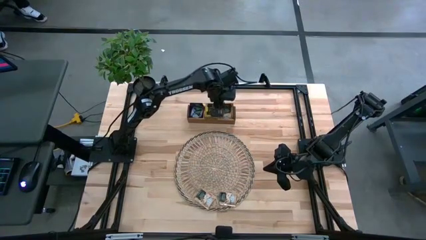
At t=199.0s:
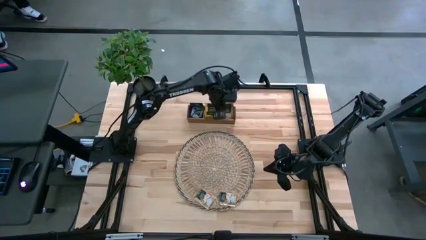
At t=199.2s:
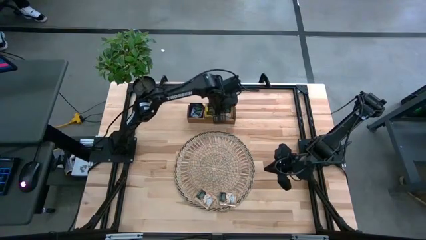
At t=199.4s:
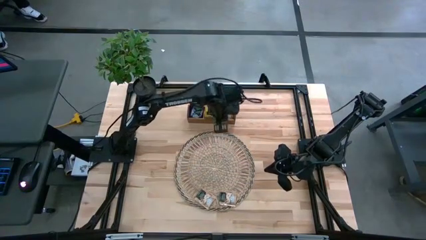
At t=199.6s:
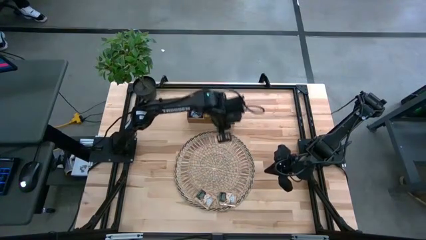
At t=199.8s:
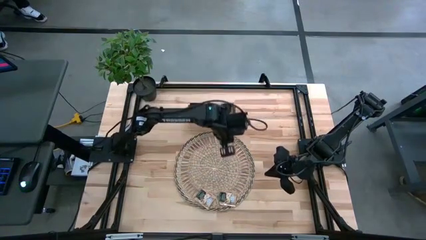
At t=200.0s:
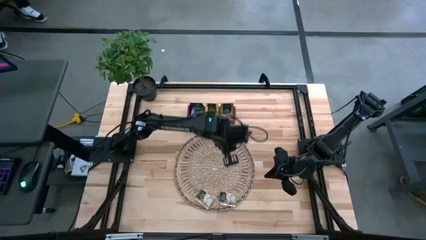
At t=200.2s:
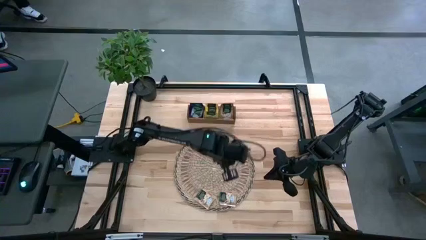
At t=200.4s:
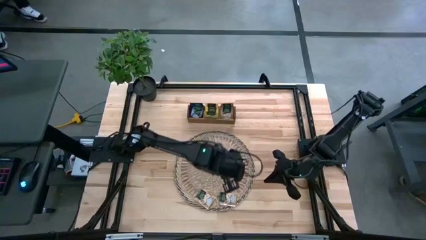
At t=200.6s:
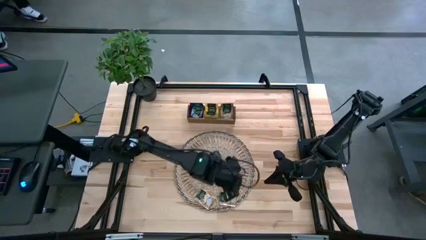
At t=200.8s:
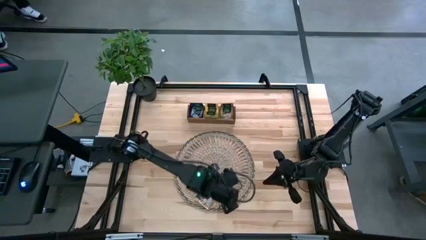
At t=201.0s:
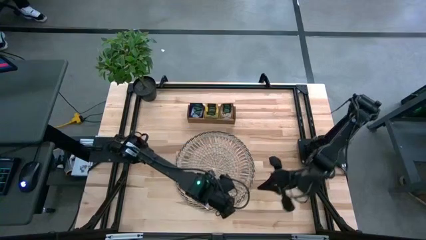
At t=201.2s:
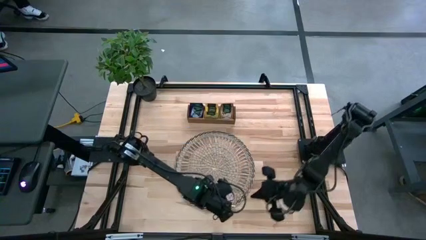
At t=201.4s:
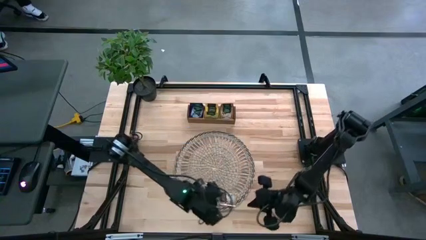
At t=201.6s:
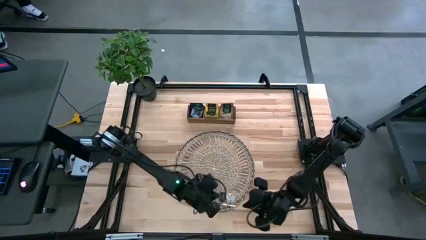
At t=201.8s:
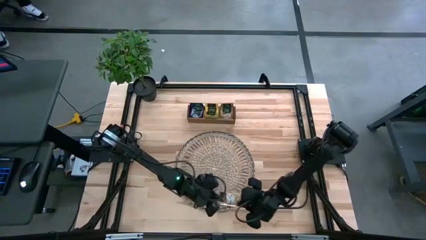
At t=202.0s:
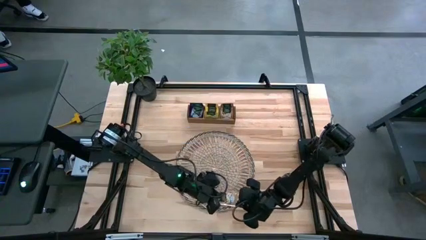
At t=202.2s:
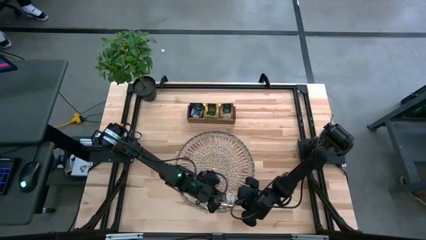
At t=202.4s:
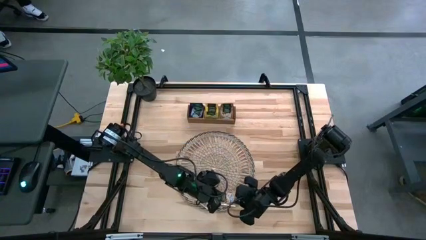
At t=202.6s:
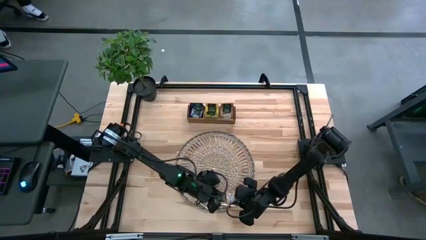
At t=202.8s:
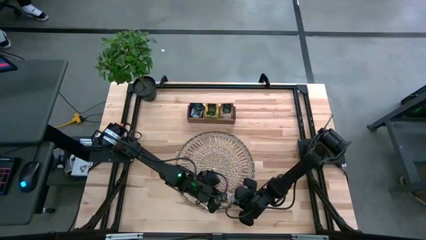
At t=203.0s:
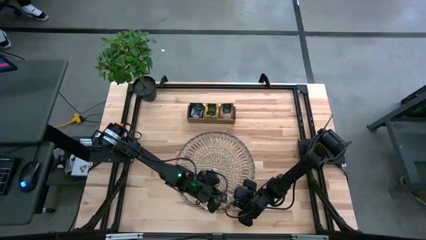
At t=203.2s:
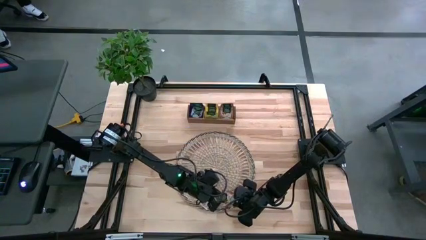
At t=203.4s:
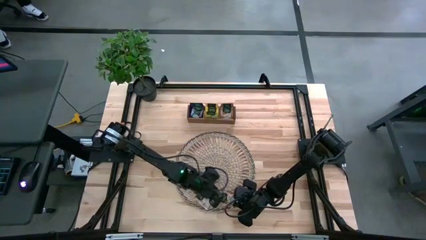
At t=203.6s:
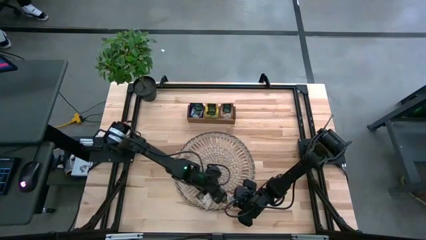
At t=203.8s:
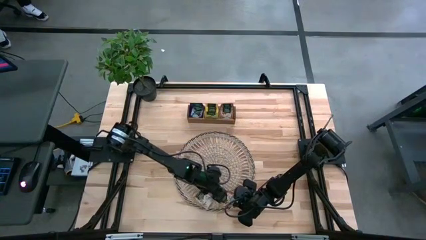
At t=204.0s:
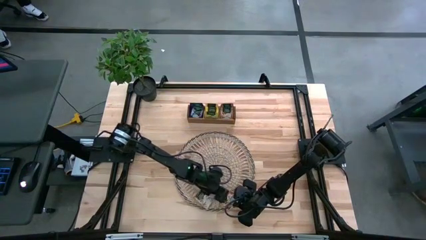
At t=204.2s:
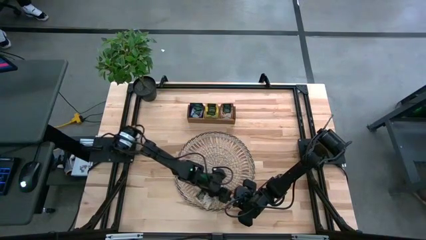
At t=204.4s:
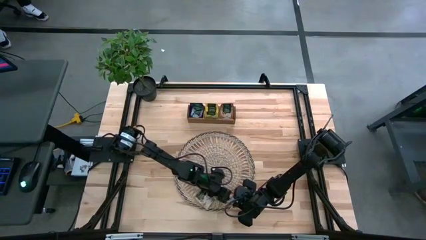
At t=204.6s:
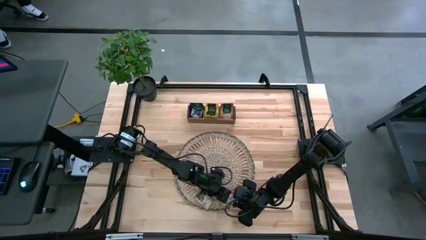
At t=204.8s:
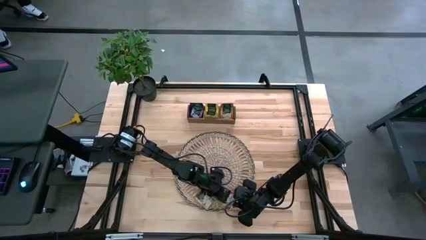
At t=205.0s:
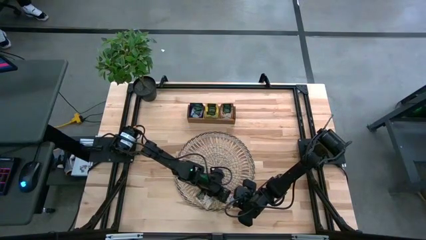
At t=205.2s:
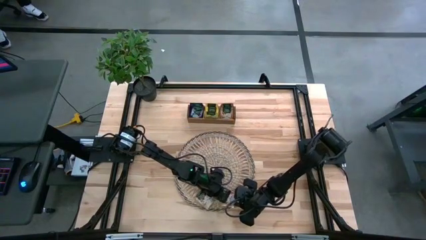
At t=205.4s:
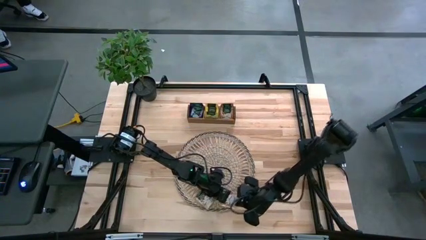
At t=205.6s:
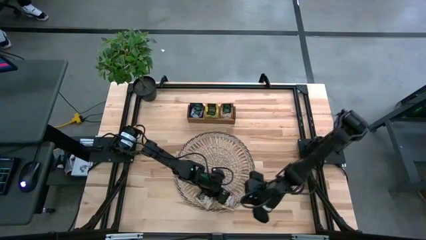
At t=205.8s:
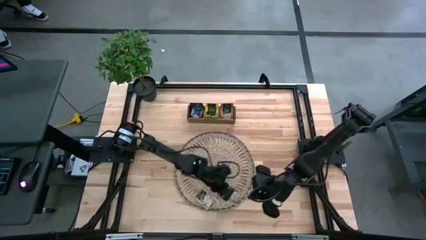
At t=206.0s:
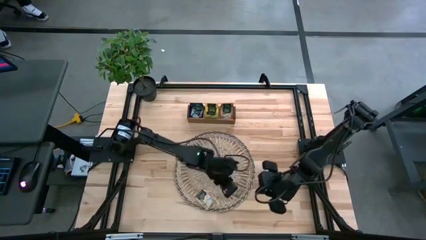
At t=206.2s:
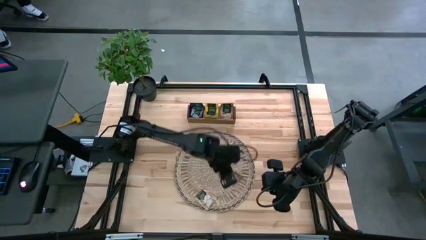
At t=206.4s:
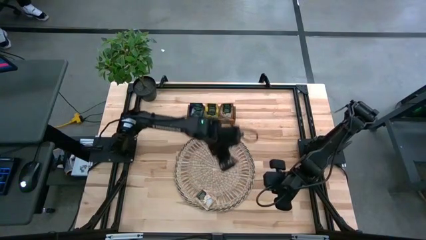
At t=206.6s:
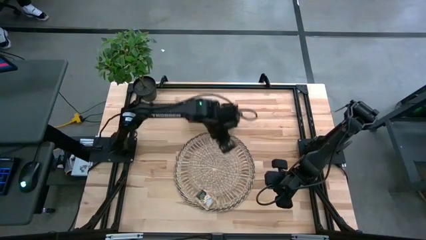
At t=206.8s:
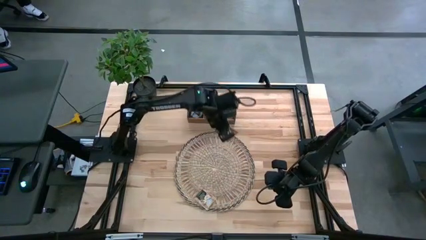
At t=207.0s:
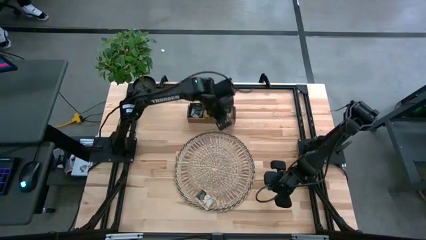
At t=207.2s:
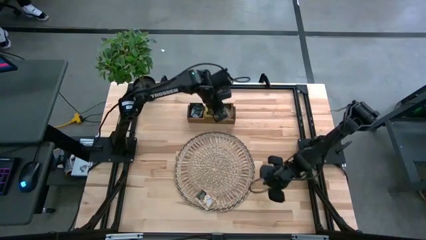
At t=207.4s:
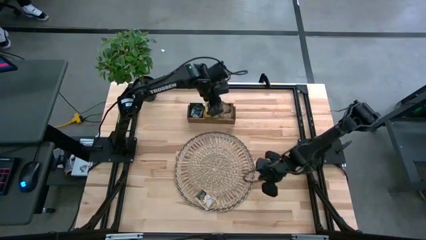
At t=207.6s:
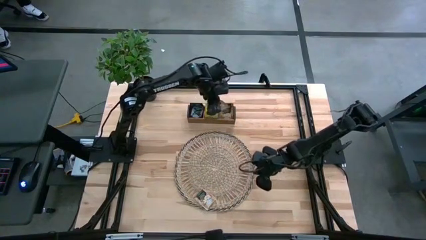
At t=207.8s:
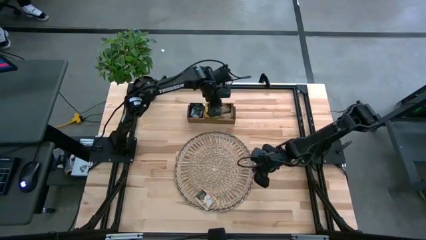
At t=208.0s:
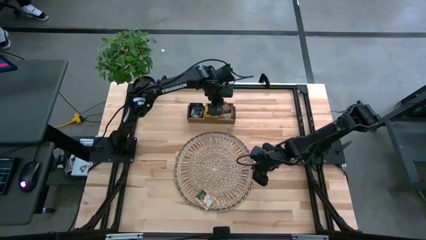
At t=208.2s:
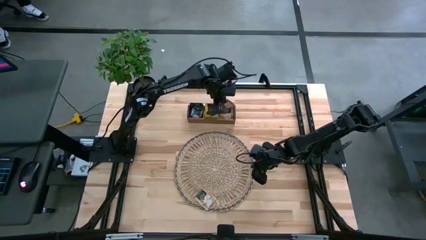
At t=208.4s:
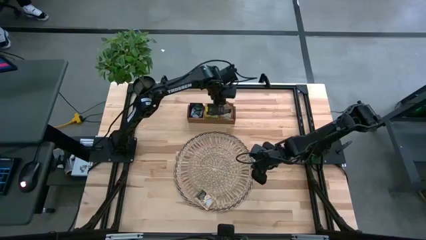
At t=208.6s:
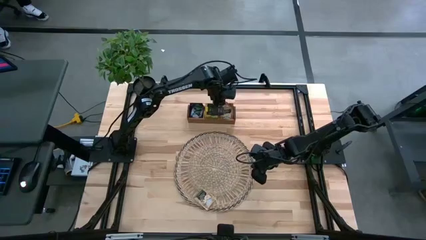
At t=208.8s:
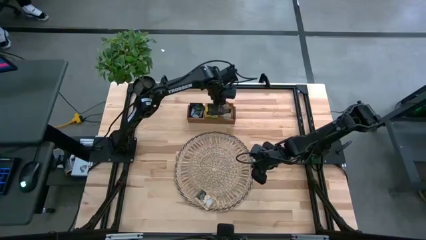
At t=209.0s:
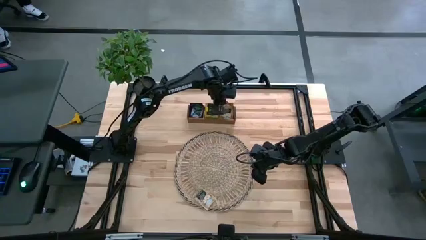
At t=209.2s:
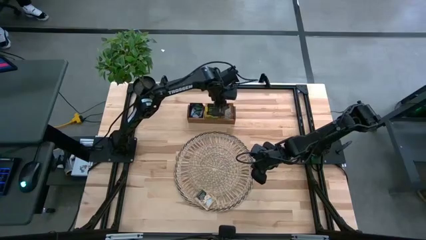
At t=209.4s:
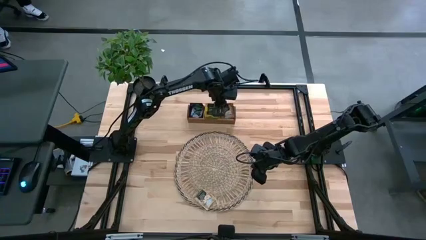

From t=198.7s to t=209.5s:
Task: Pick & Place Tea
Put the brown tea bag in the right section of the wooden organizer

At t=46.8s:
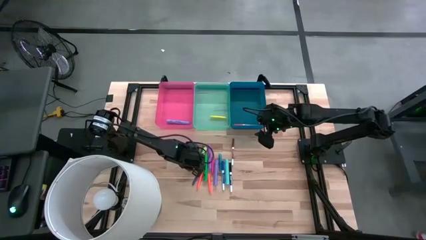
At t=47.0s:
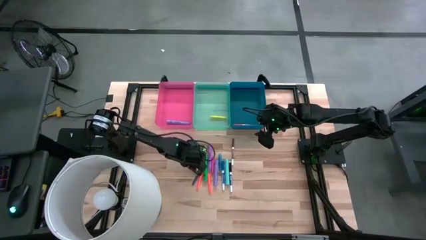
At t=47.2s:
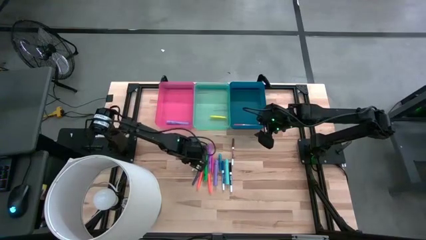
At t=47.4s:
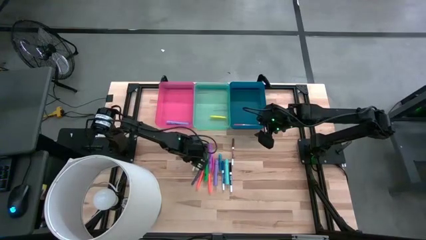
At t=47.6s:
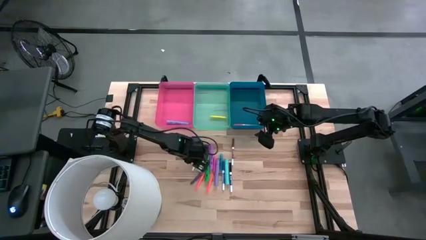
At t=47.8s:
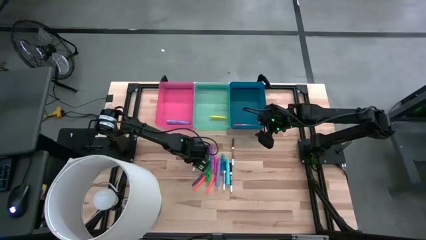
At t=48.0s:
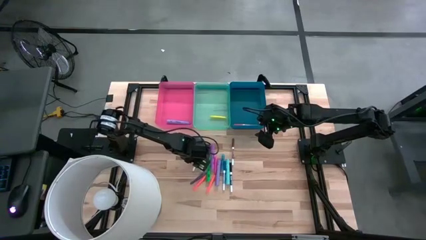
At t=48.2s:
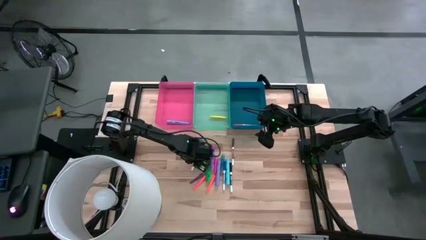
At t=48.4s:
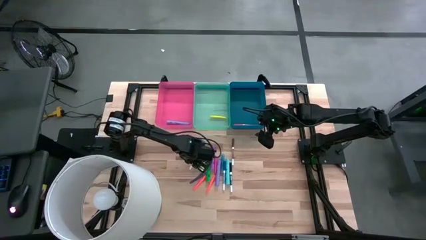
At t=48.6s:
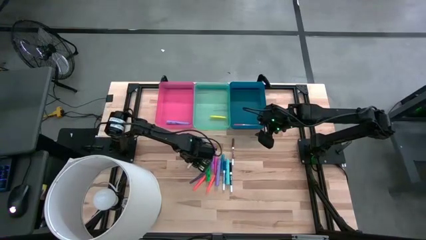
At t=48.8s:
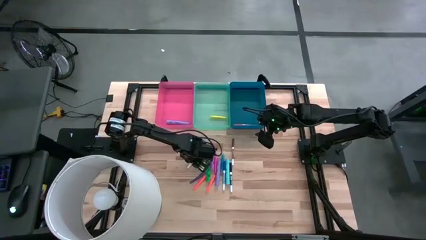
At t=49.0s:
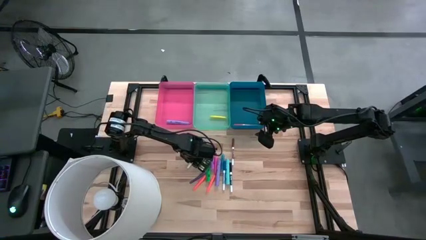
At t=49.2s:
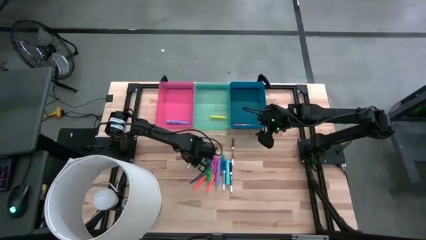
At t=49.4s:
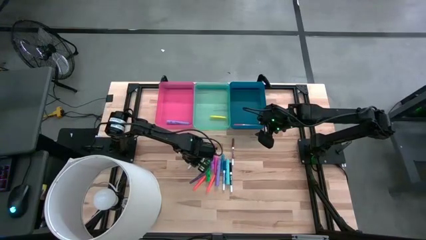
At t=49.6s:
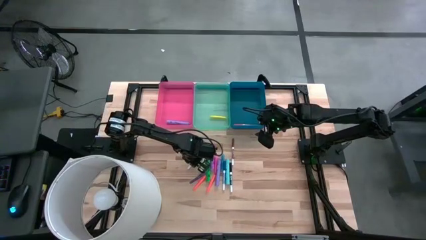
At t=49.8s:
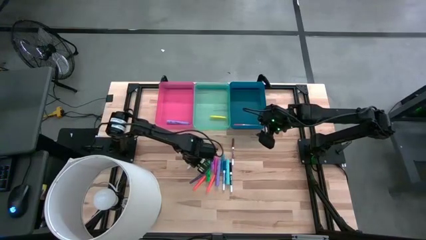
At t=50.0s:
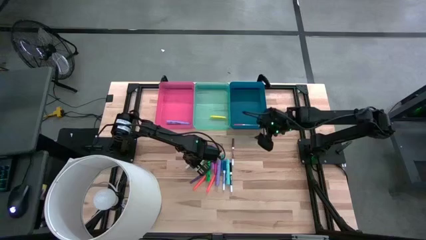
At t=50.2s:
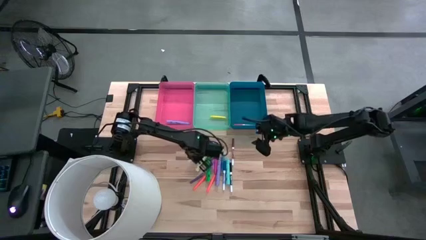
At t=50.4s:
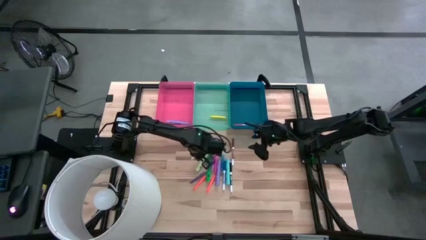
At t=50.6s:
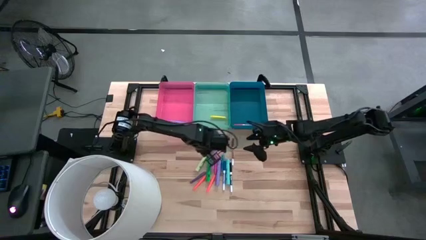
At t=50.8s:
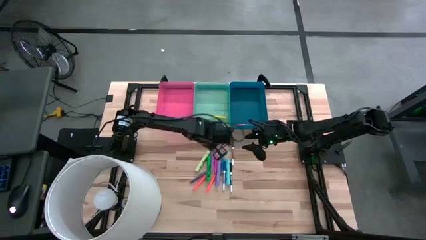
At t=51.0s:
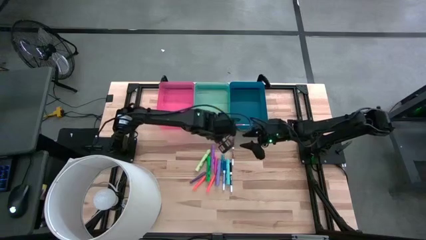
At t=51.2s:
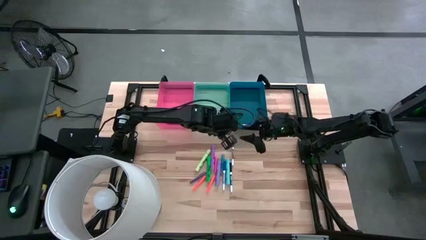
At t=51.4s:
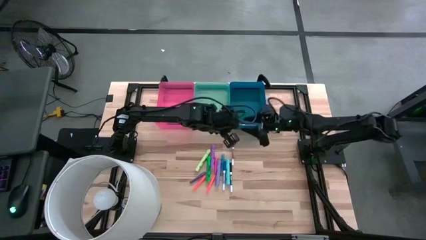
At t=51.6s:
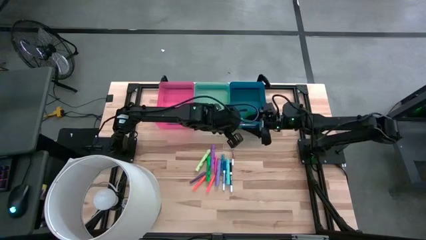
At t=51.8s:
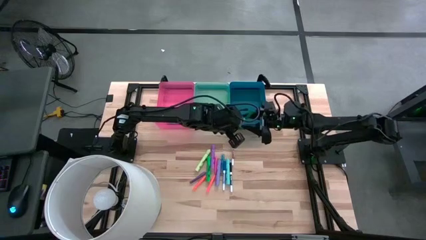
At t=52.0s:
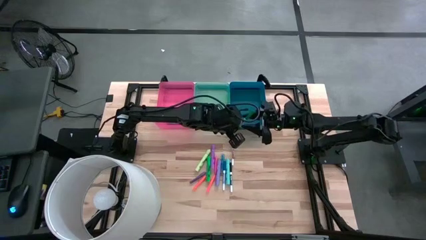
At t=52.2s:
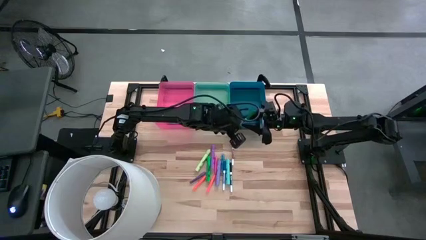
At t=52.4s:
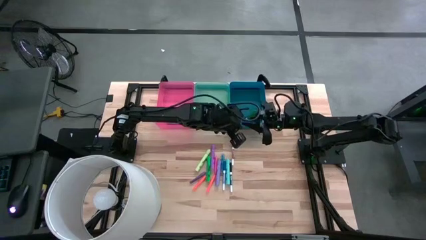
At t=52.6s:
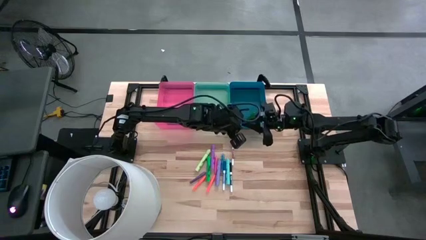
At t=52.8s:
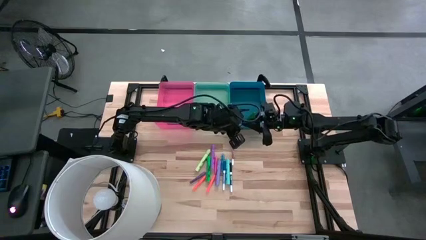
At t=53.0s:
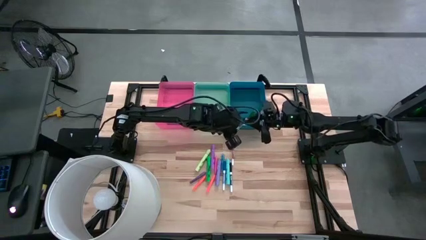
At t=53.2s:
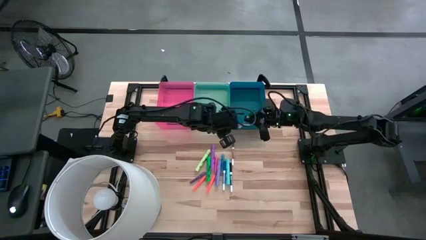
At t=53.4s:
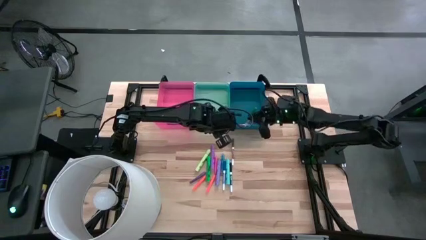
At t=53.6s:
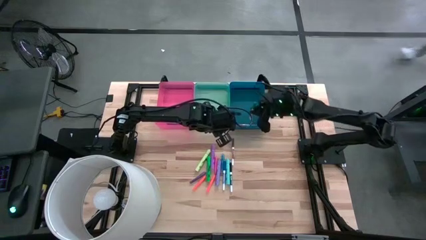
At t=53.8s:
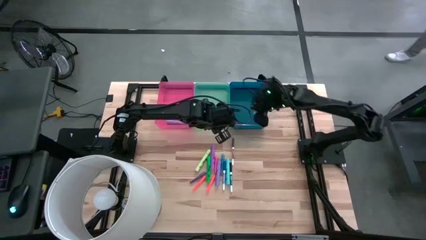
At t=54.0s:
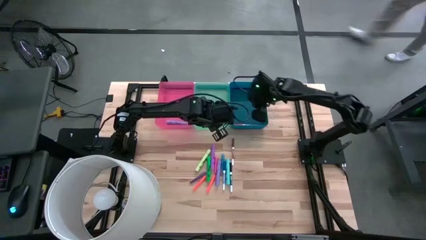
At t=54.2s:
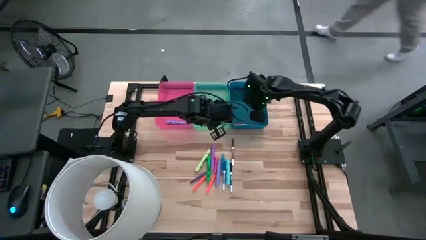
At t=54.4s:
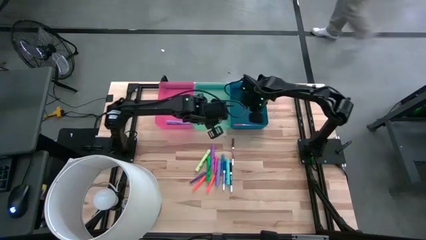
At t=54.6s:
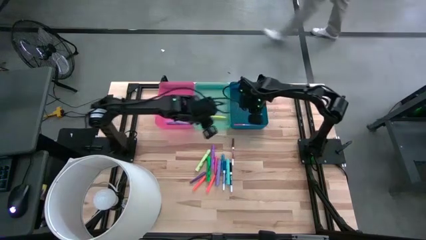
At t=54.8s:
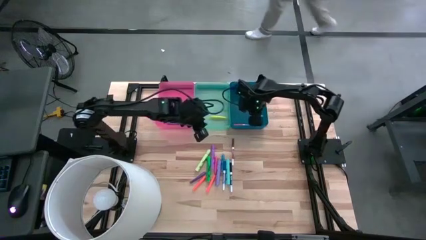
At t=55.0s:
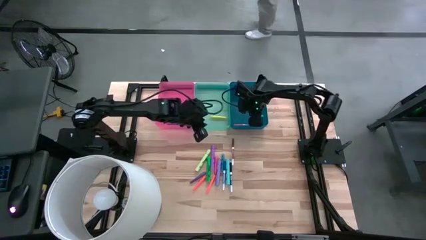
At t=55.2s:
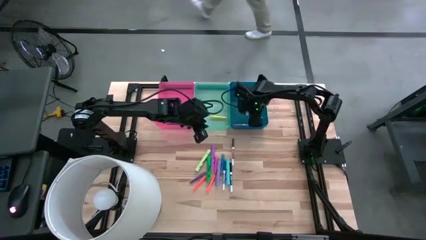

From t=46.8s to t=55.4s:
Task: Pick & Place Markers
Put the green highlighter into the blue bin
